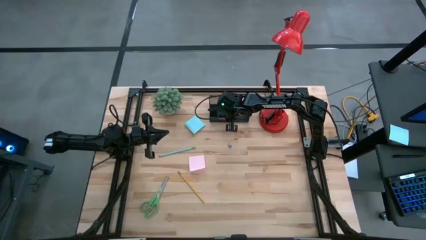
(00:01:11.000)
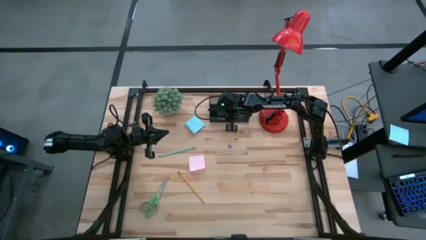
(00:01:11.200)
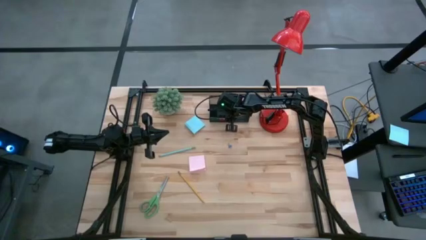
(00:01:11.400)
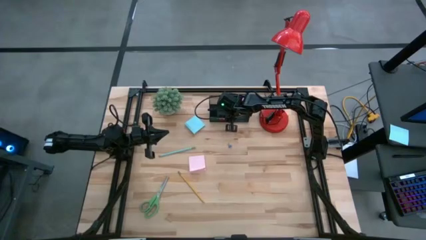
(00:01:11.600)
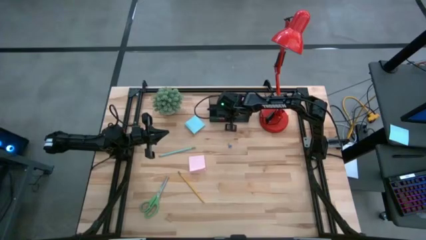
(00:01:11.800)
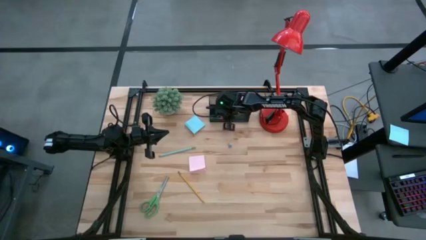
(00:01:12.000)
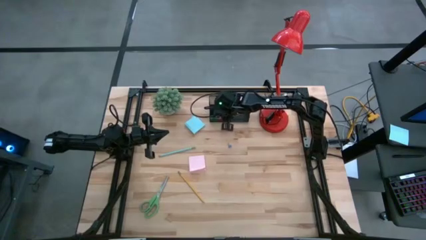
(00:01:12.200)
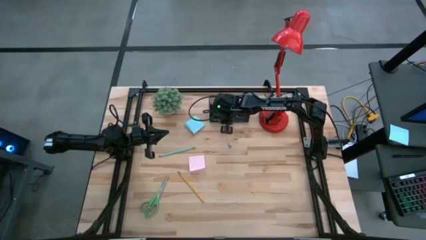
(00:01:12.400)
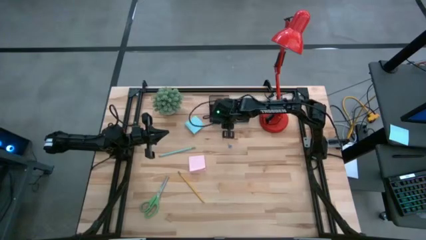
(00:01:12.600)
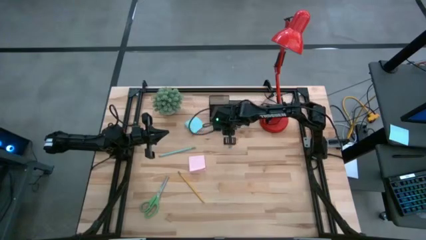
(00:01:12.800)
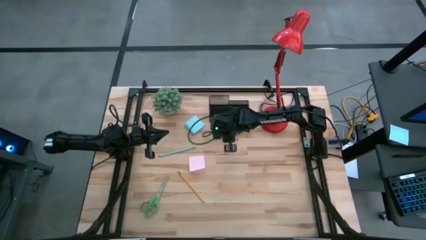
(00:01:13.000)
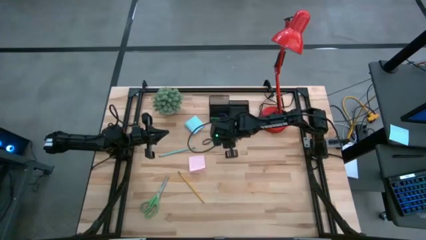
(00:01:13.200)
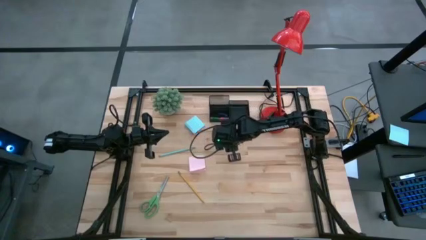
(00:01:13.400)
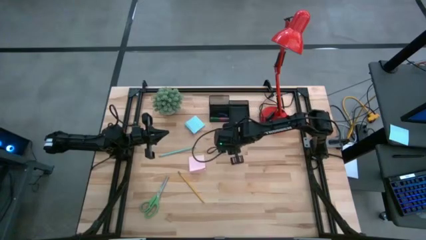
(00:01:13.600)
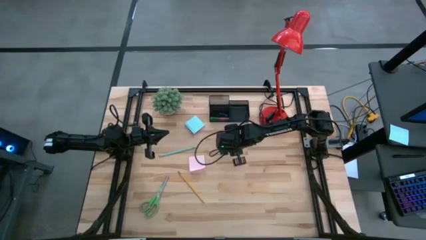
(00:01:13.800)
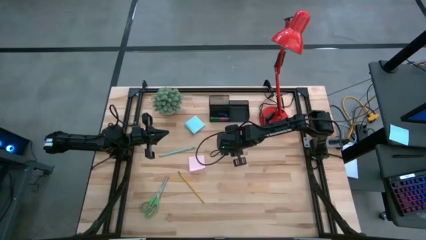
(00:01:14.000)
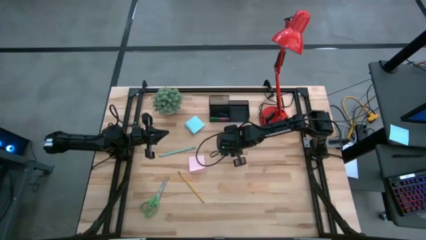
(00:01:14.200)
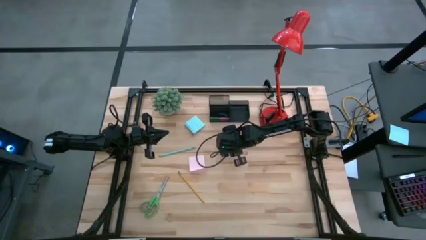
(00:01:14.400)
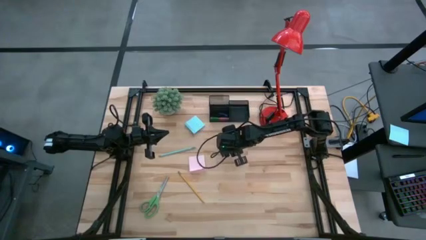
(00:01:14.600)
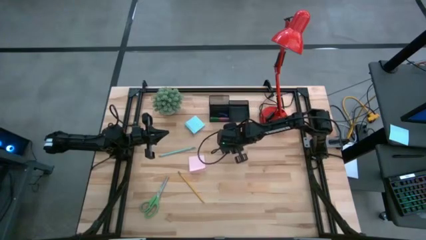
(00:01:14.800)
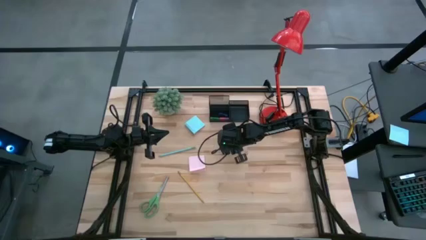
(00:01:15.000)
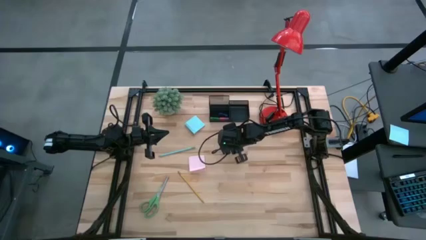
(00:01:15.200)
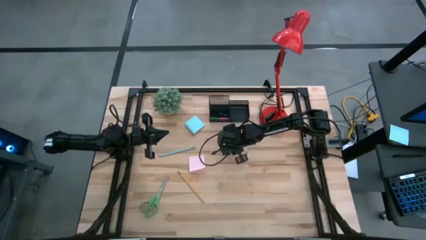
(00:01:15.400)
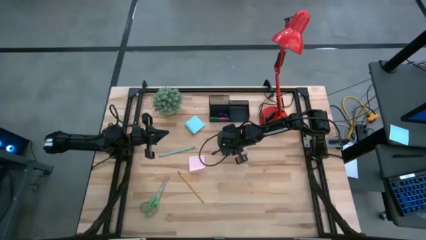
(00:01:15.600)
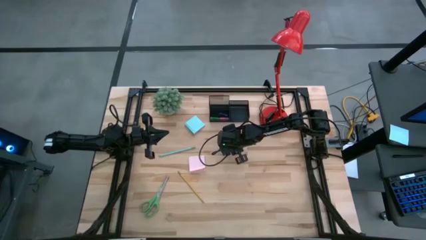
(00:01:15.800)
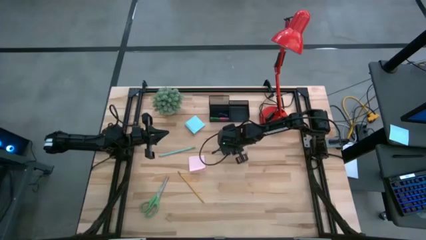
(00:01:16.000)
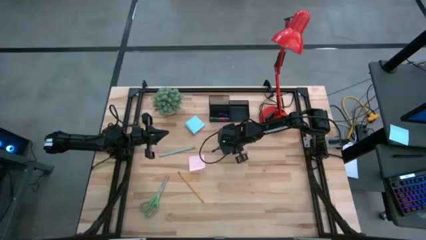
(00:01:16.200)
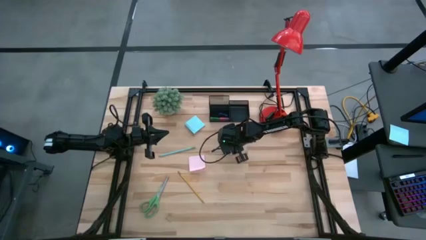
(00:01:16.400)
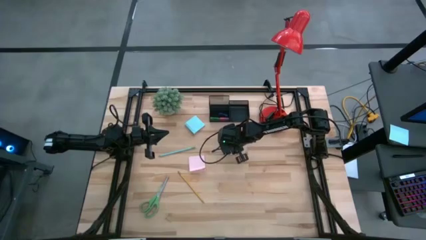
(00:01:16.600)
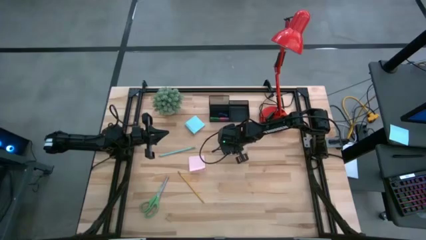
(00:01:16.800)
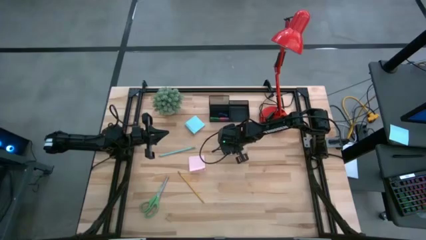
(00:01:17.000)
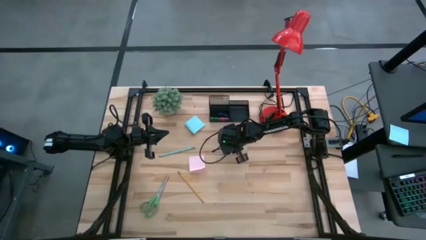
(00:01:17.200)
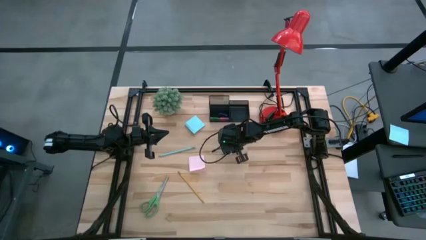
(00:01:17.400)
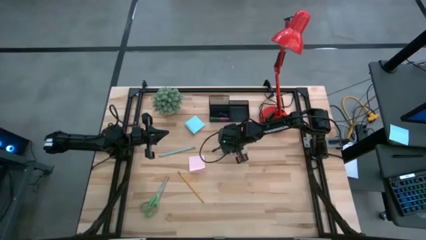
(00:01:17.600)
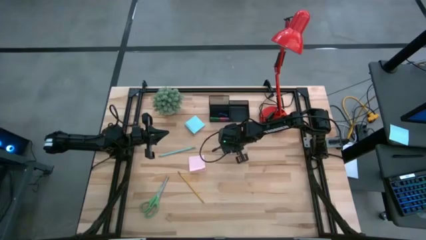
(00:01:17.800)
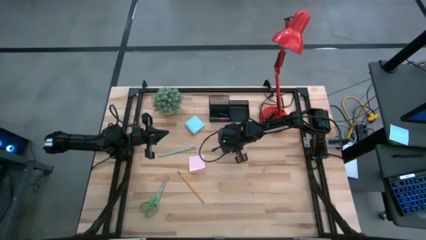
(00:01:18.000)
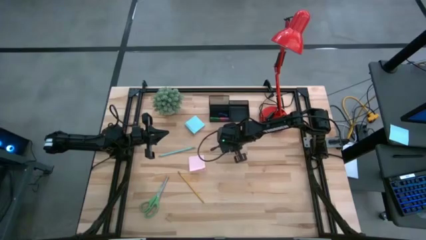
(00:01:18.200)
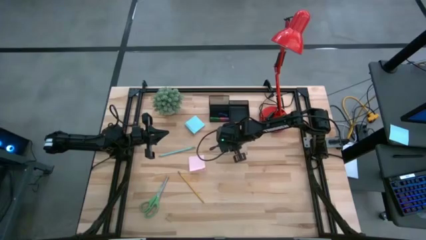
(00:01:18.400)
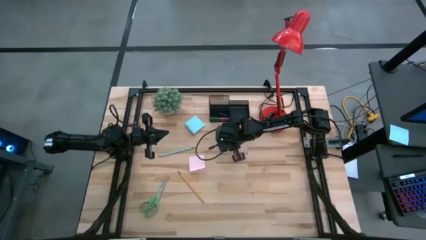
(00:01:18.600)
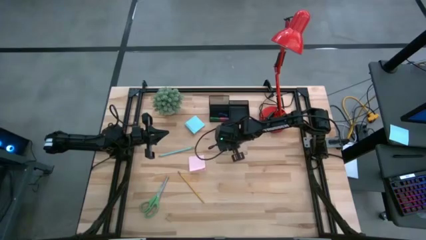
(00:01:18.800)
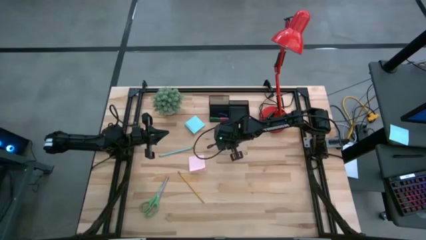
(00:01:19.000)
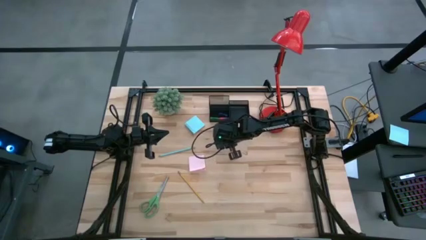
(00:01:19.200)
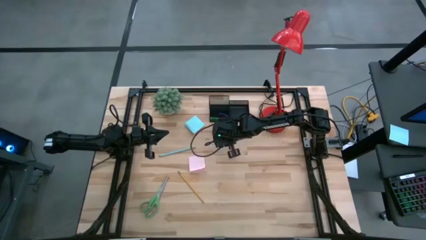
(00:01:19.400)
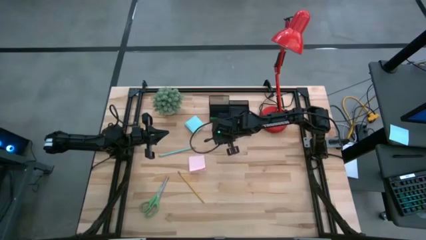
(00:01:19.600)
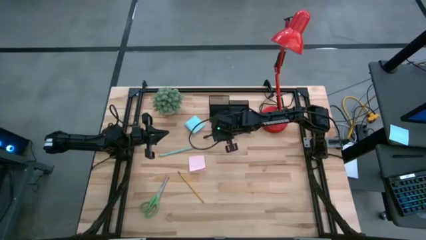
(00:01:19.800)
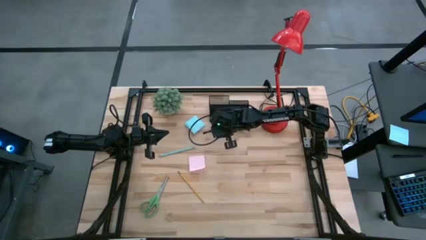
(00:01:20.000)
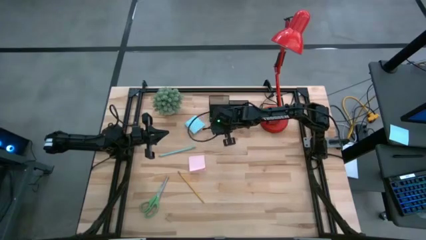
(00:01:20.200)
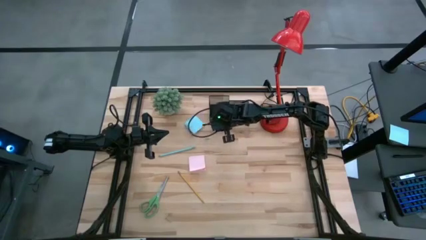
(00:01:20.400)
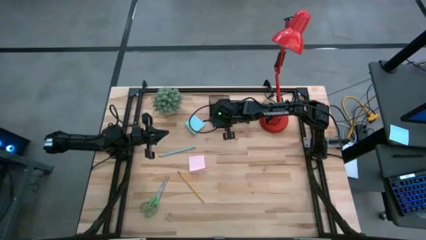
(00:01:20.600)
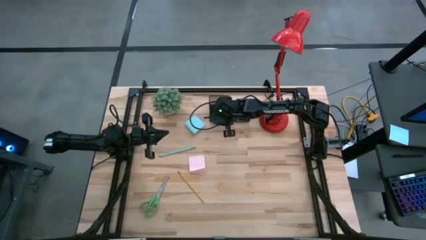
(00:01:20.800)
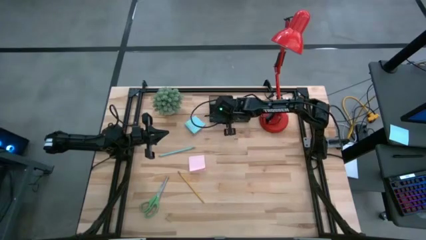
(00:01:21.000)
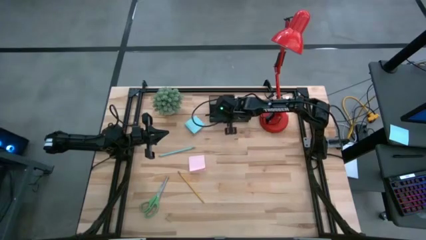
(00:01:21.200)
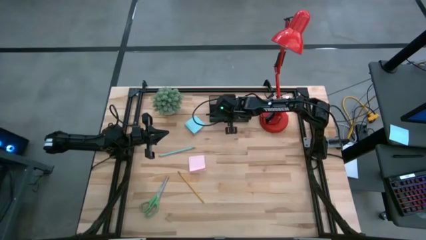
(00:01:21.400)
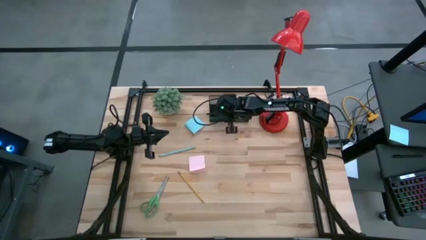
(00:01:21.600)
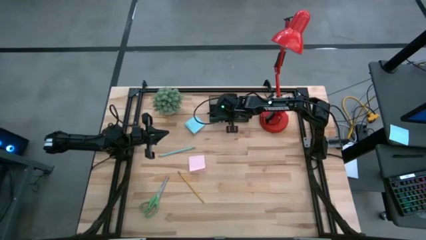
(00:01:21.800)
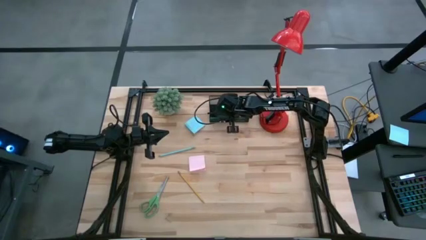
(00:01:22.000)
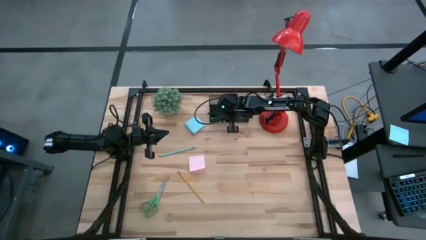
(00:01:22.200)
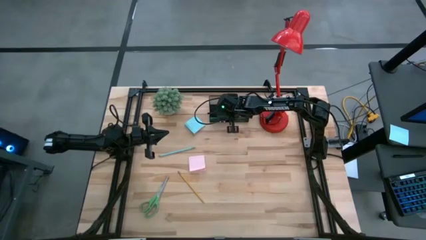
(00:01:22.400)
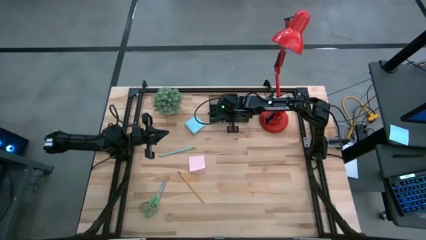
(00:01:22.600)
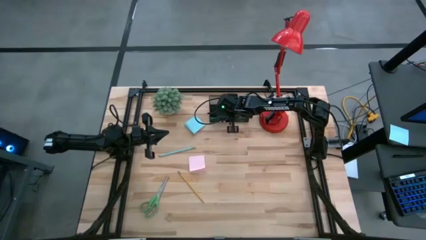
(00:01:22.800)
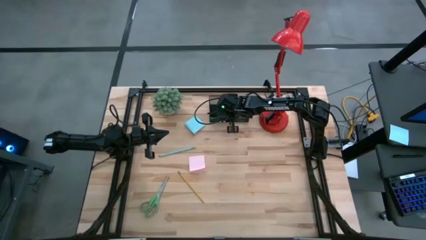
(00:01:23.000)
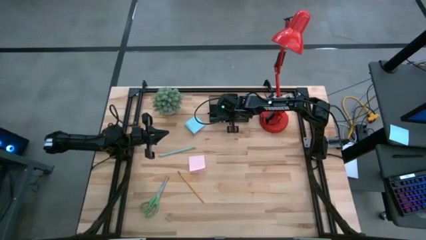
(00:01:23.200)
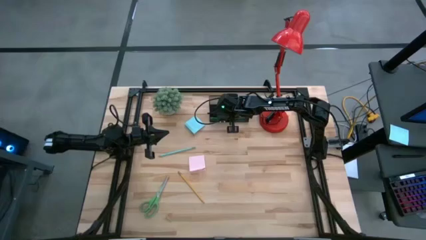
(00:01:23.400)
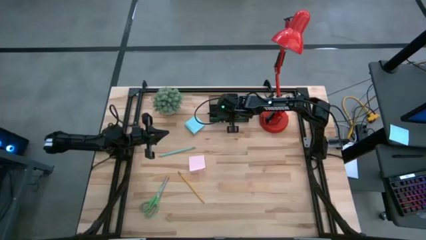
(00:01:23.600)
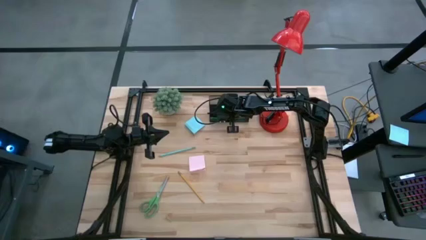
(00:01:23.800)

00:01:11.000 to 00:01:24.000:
Task: Pick and place office supplies into organizer
Put the light blue binder clip into the desk organizer

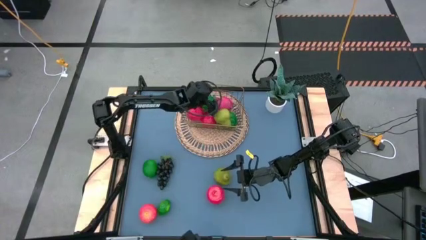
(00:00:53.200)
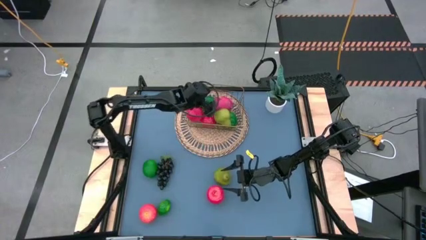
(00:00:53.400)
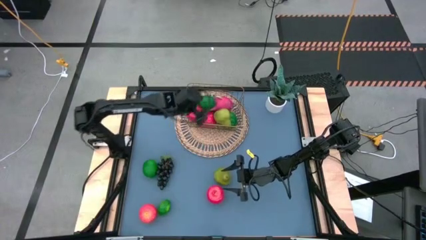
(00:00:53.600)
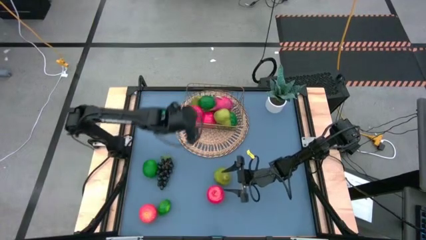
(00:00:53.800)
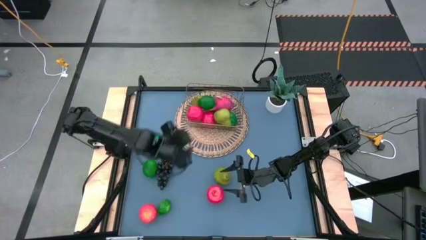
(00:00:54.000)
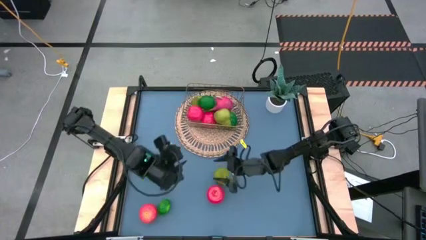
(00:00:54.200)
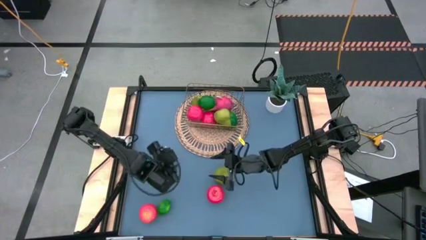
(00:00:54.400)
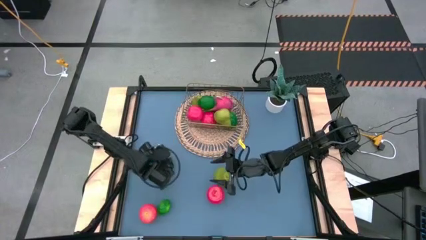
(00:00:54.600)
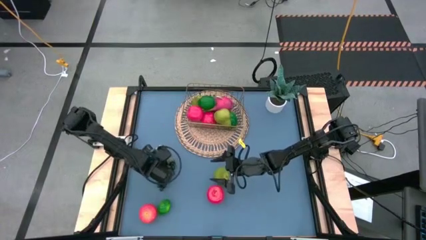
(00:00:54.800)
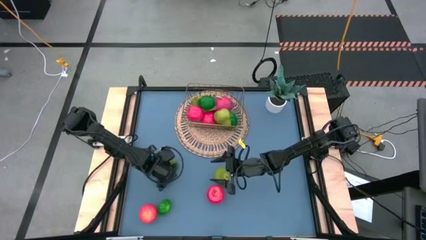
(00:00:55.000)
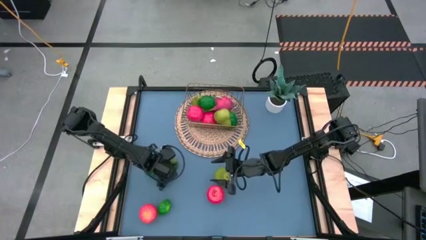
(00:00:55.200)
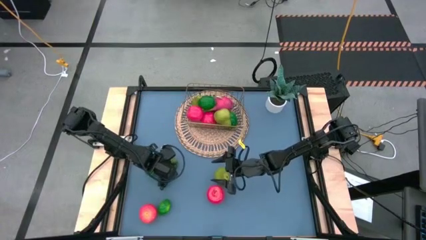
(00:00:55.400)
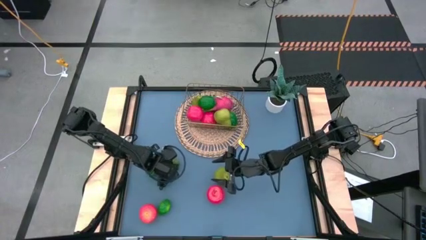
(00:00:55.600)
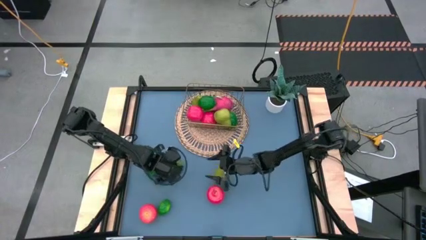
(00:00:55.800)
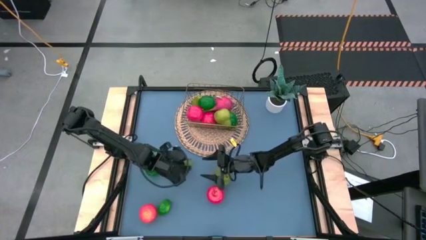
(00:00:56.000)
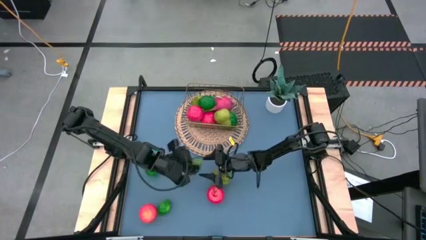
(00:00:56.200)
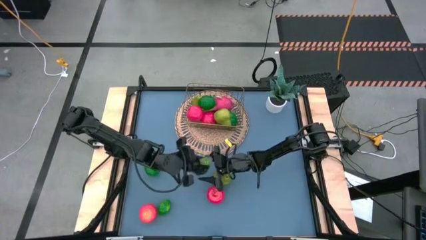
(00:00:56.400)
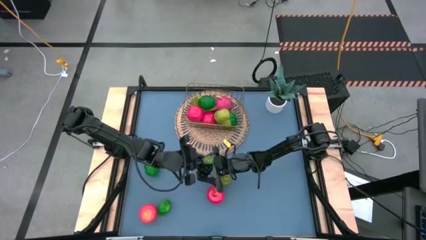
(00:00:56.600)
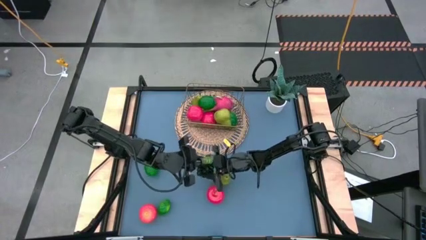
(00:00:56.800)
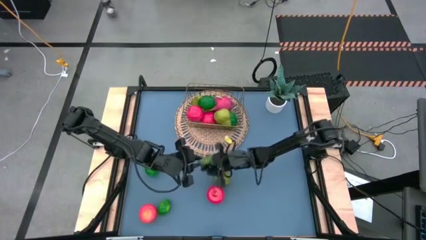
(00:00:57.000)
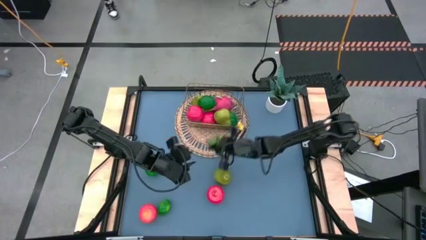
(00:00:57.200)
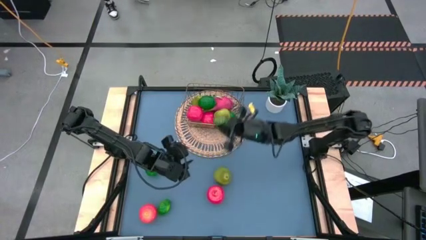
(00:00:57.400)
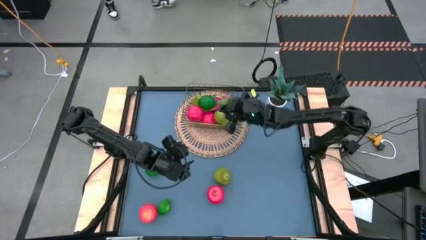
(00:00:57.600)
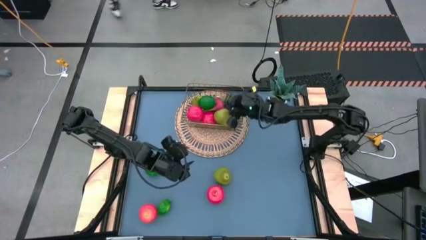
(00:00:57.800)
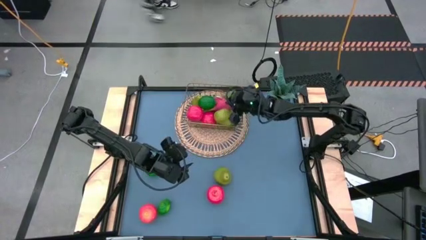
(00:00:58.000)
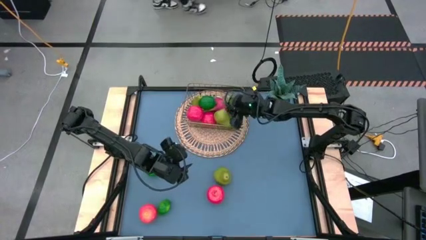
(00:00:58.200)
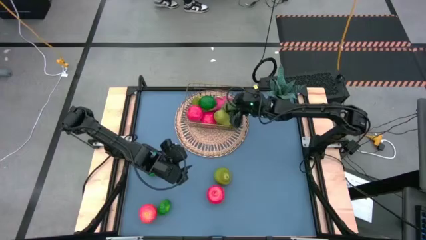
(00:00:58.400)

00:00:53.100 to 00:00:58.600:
Task: Build produce basket
Put the black grapes into the gold wire basket
